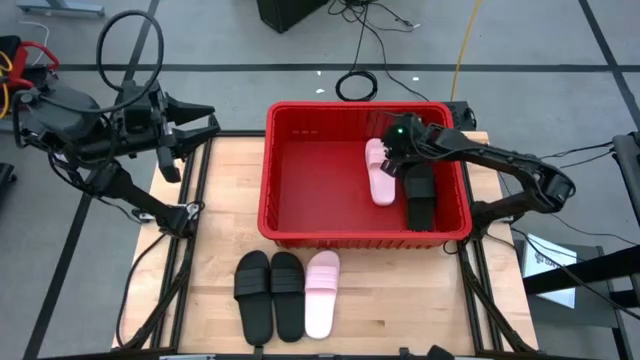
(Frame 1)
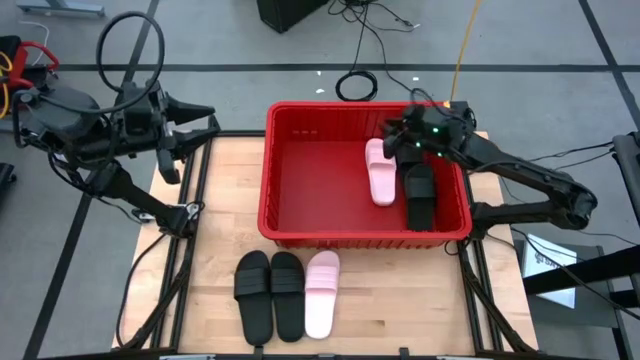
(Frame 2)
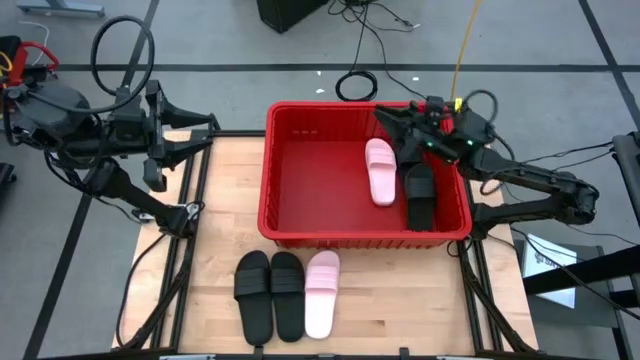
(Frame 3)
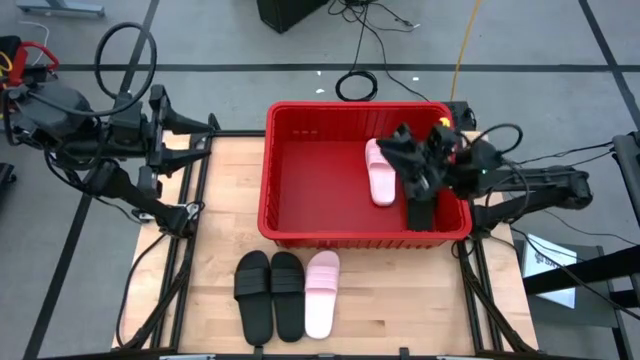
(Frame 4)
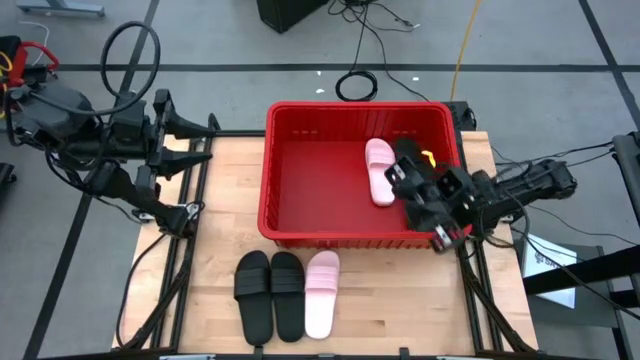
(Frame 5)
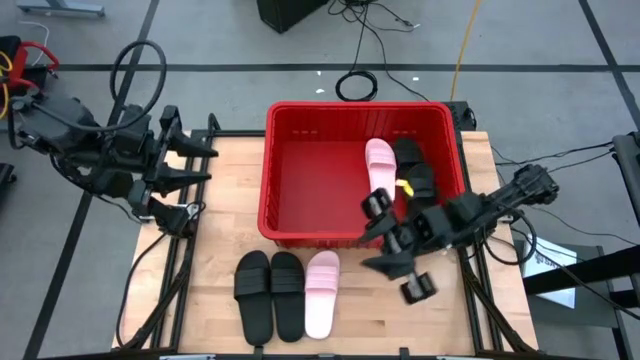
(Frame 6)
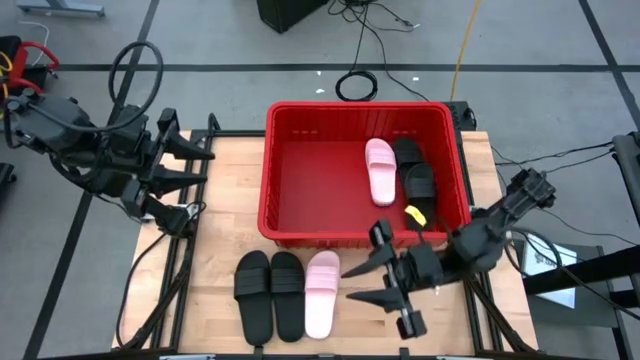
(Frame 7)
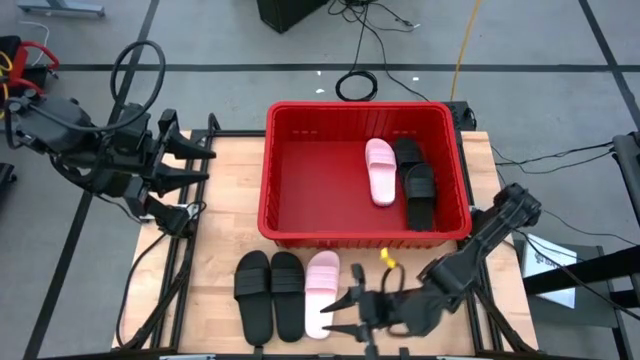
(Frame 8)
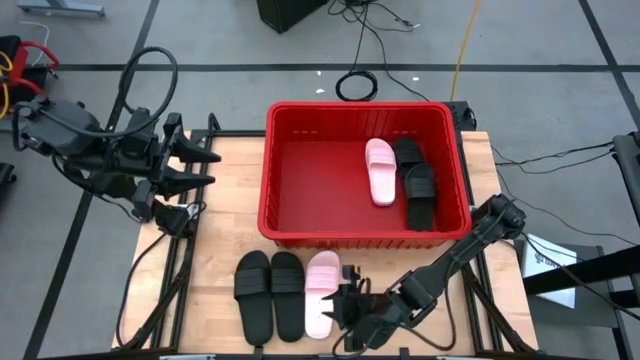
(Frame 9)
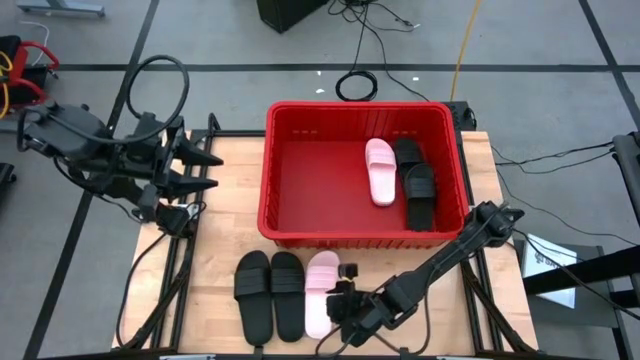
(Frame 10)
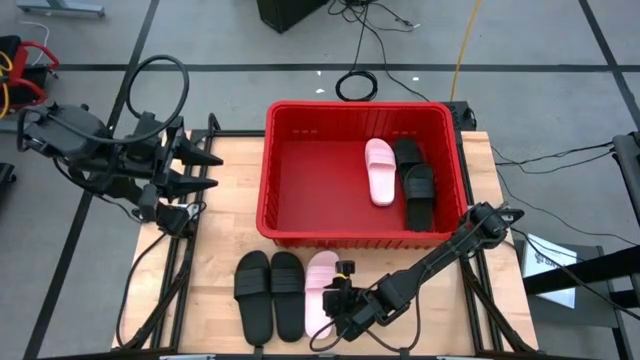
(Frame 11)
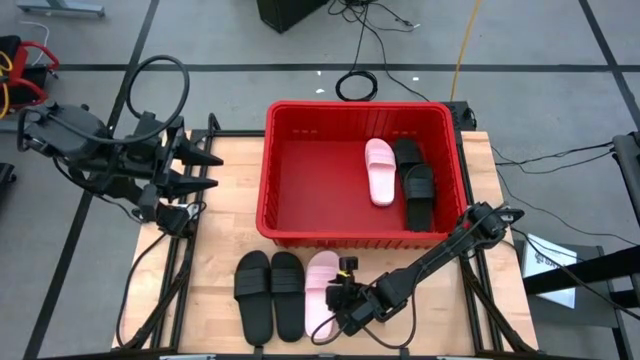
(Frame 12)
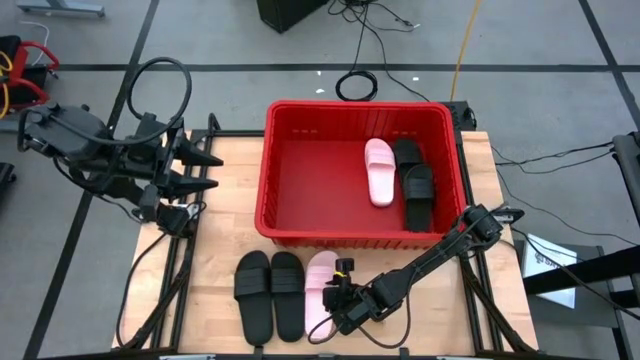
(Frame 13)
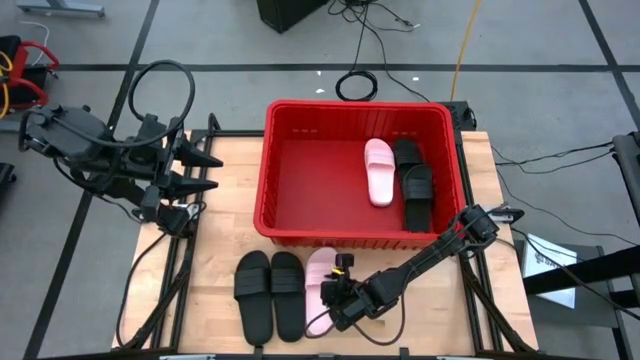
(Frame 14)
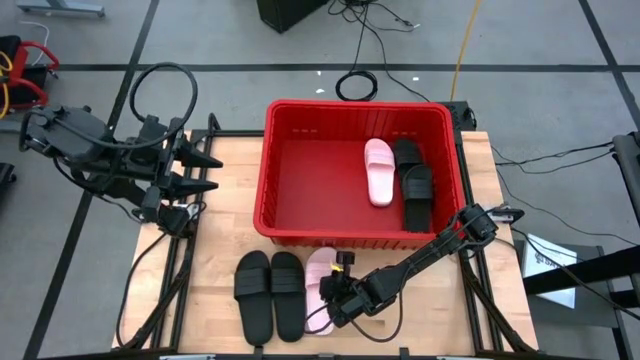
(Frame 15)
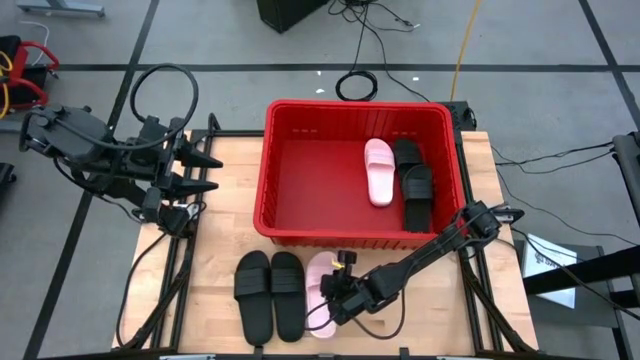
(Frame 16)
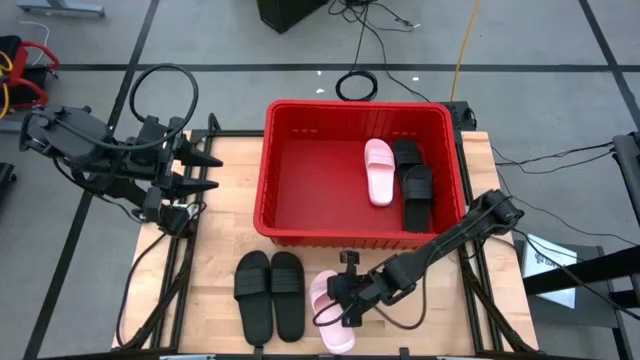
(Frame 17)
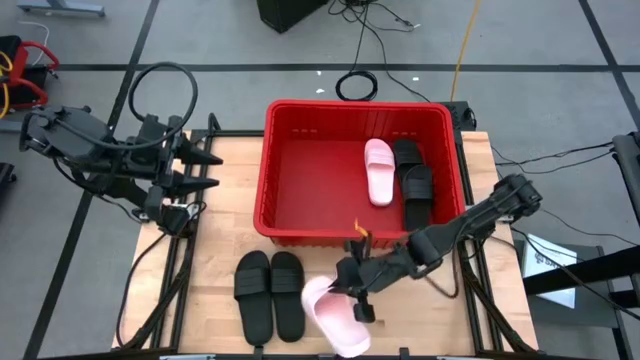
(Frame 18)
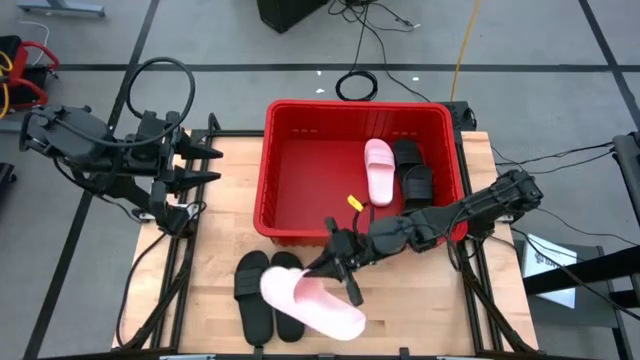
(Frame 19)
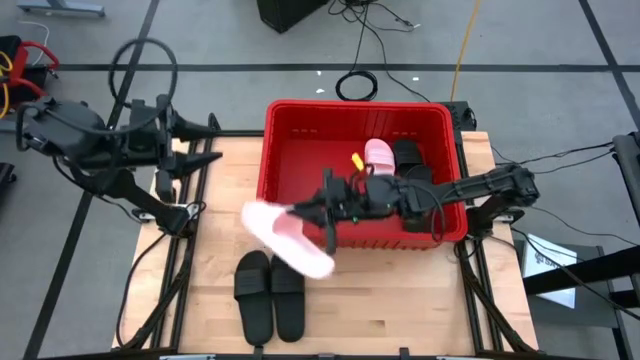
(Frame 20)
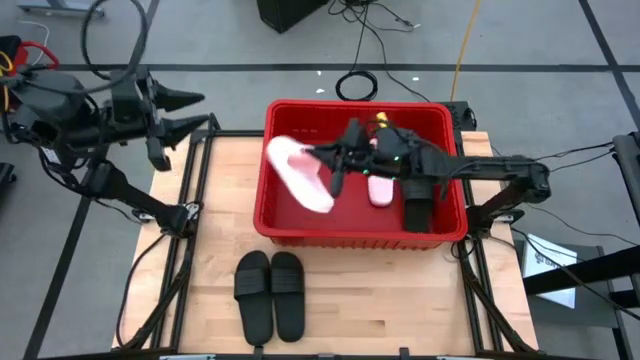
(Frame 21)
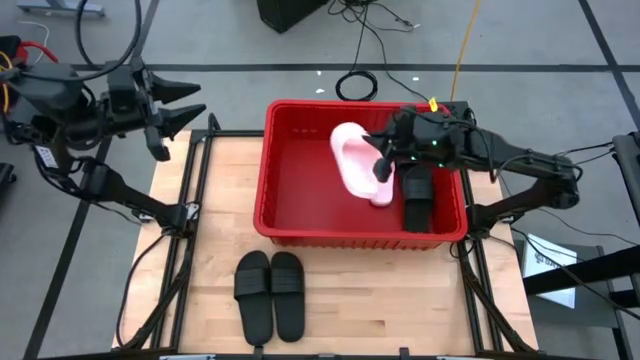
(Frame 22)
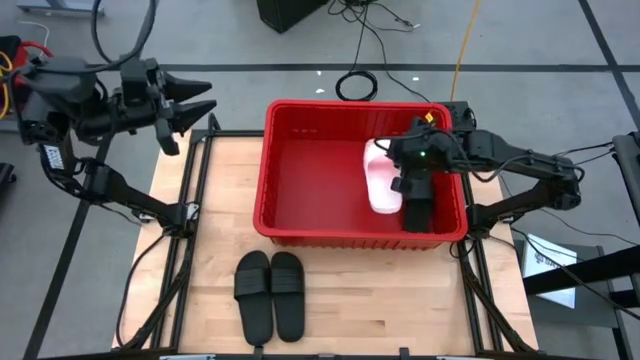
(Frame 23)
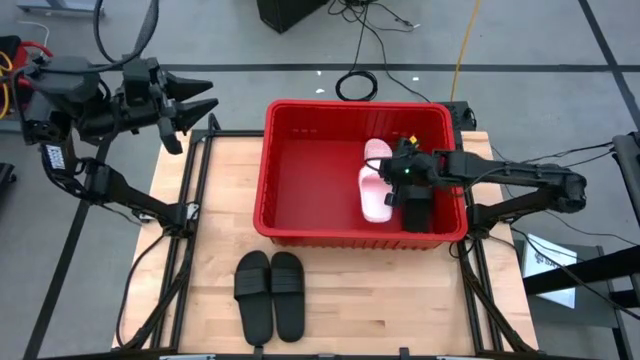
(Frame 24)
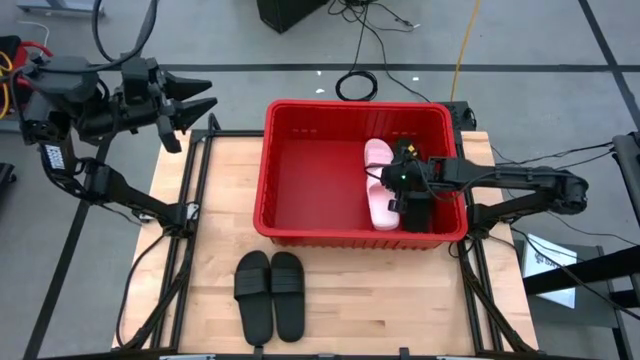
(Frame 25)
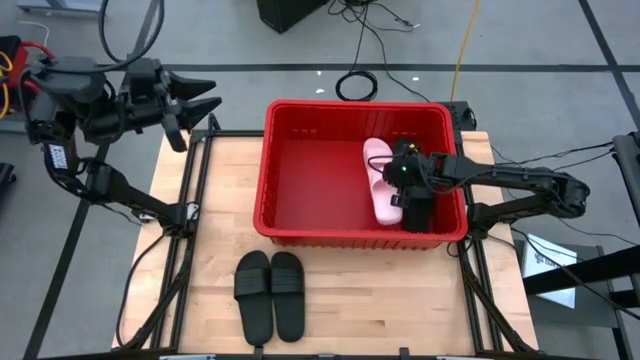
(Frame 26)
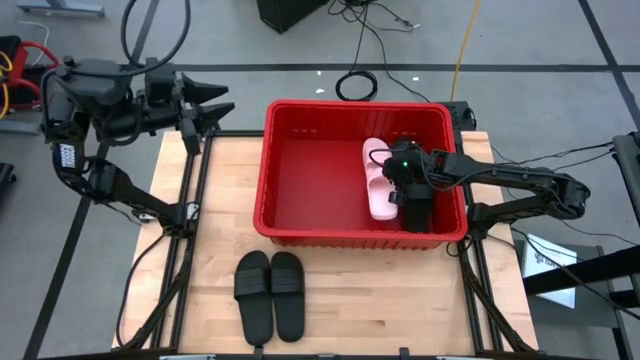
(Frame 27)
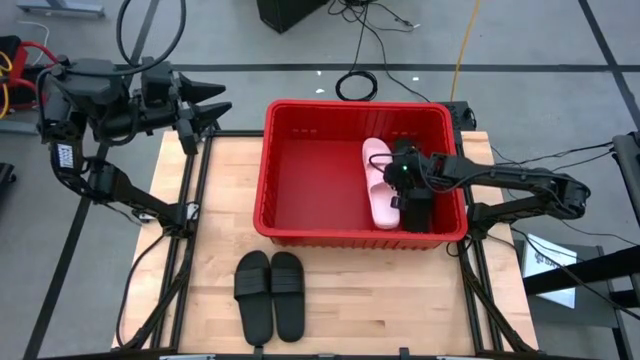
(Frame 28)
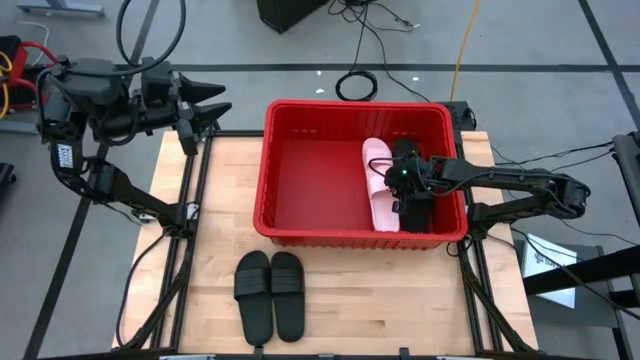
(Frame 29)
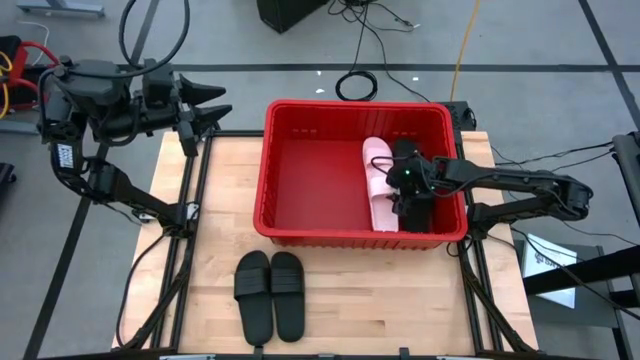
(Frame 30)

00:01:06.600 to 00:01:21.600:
Task: Pick and place slides into bin
Put the pink slipper into the red bin

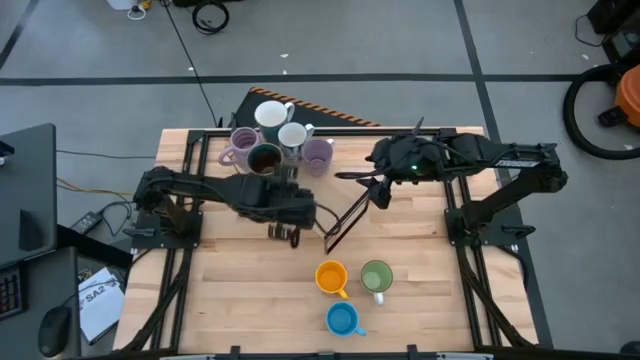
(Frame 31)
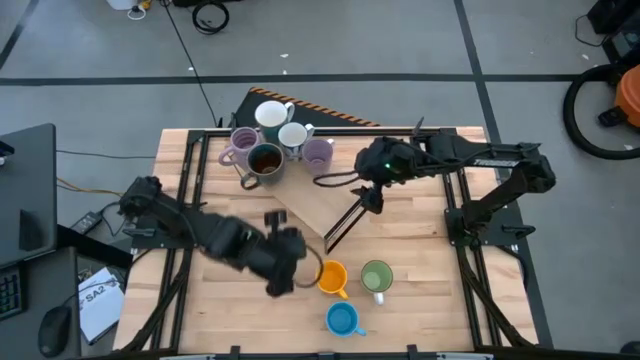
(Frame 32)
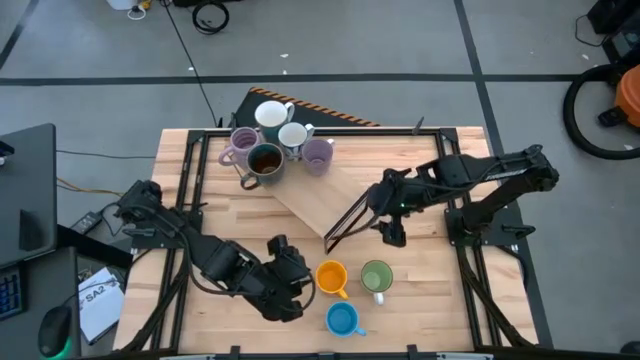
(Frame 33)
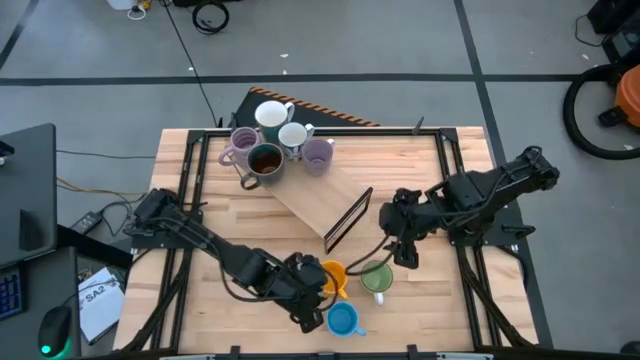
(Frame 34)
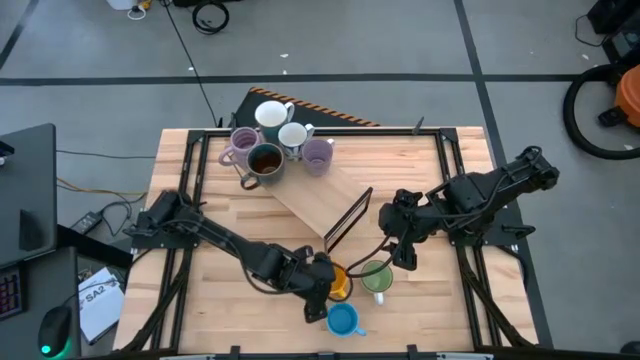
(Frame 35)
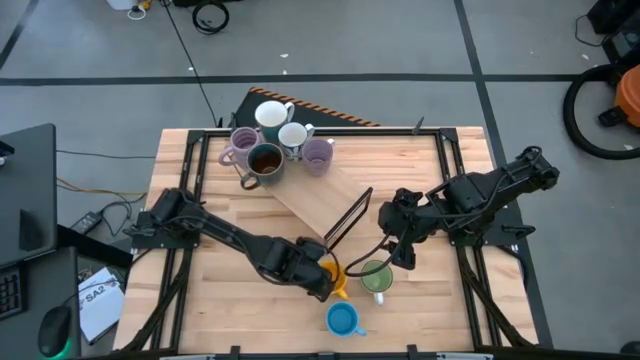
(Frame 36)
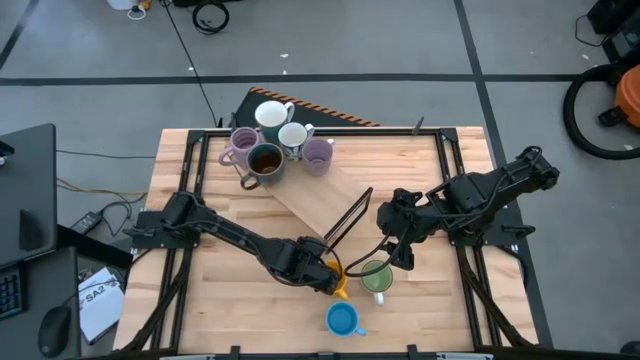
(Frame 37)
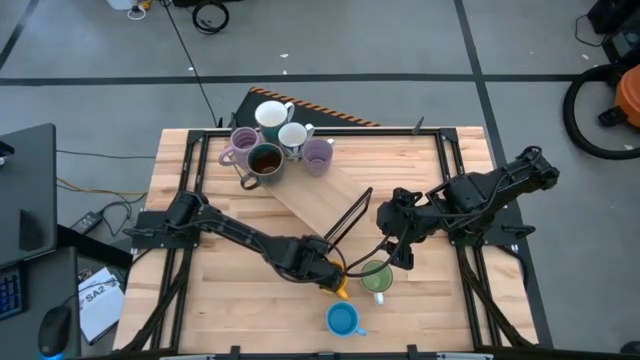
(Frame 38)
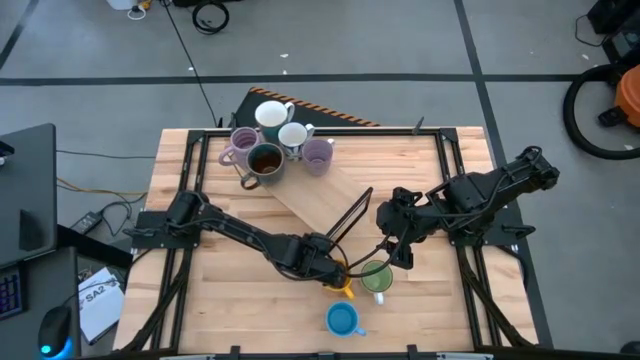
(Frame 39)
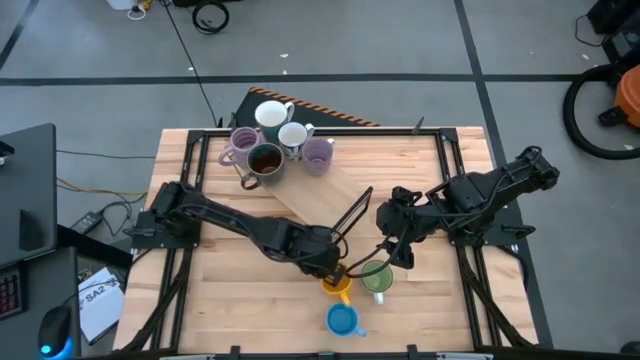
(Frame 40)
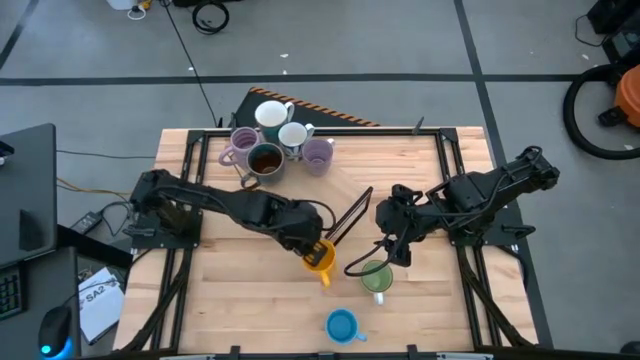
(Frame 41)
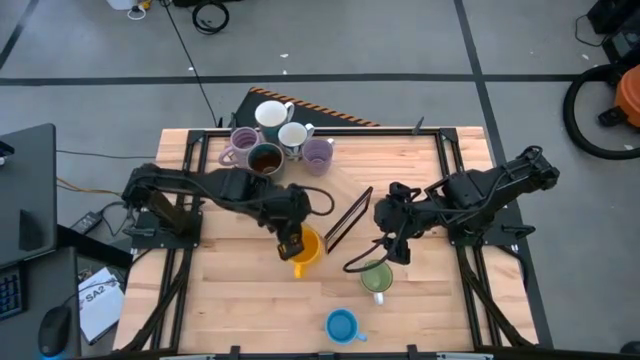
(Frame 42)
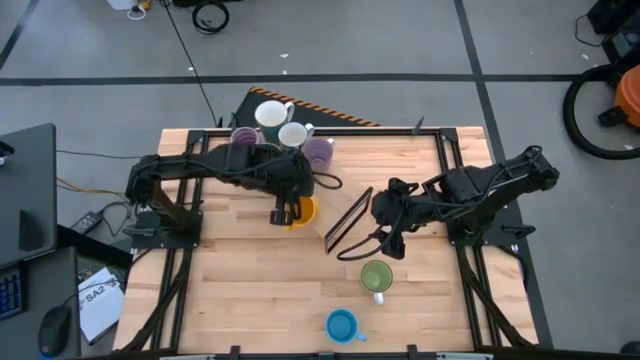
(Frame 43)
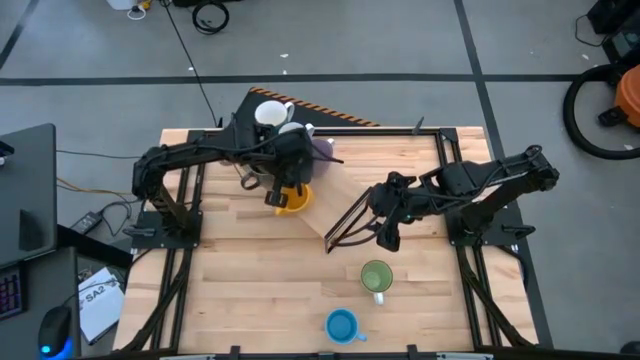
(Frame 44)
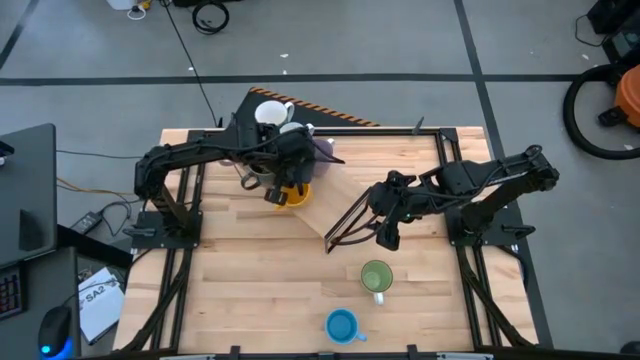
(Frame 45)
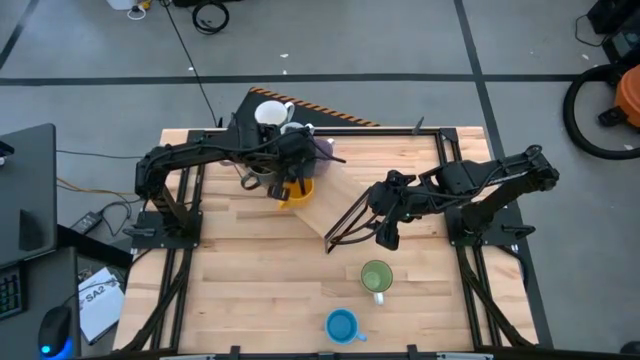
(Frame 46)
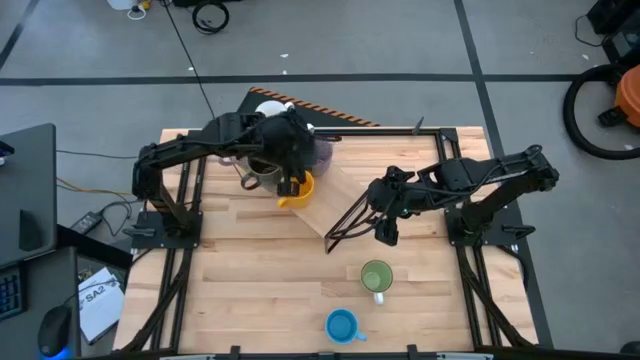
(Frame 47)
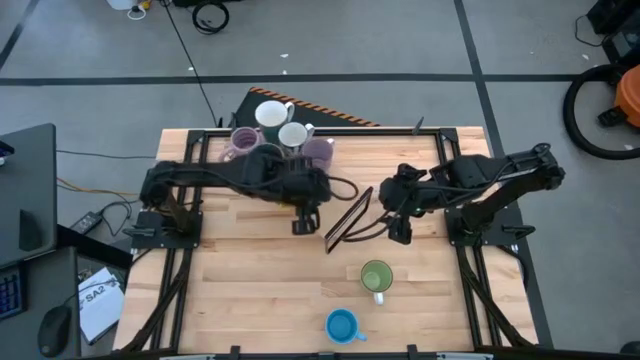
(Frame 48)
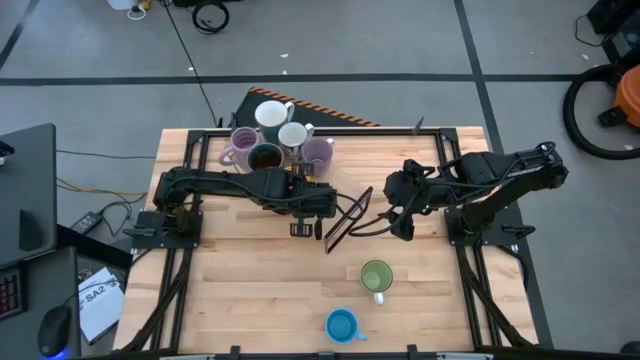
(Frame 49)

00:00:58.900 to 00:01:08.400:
Task: Place coffee mugs
Put the yellow mug on the shelf
